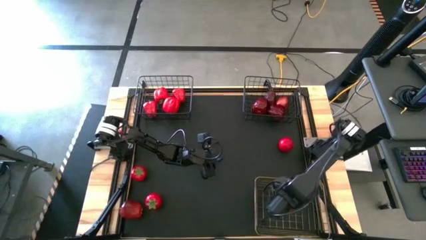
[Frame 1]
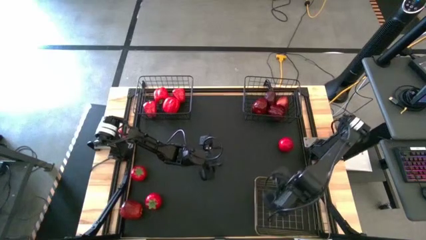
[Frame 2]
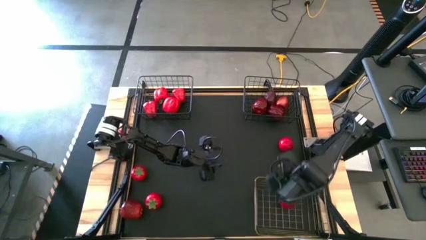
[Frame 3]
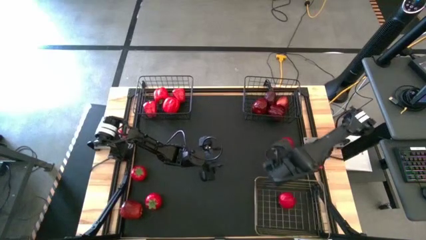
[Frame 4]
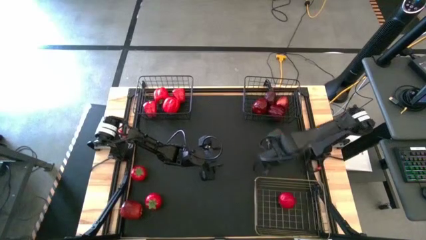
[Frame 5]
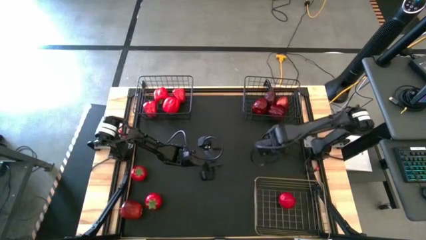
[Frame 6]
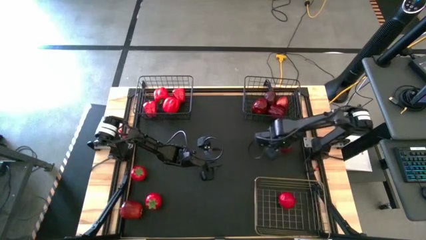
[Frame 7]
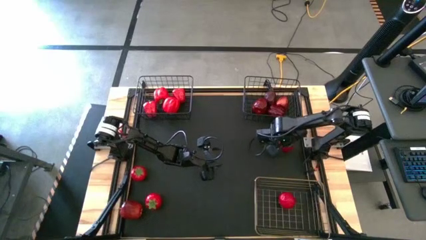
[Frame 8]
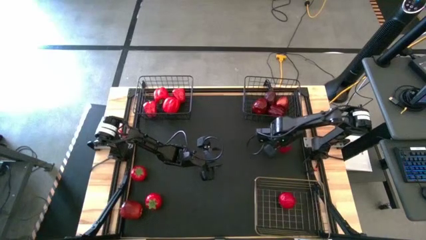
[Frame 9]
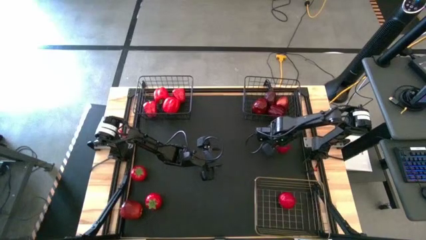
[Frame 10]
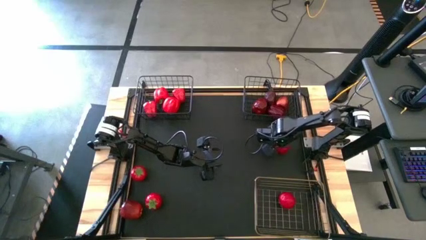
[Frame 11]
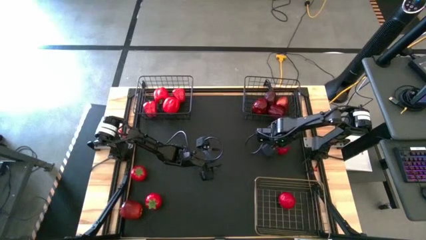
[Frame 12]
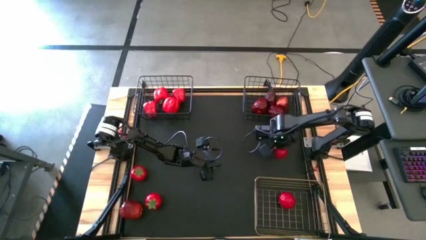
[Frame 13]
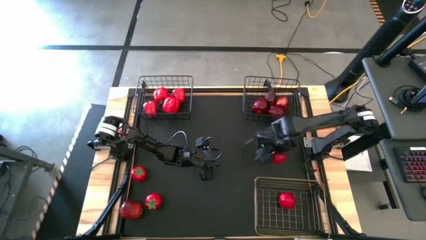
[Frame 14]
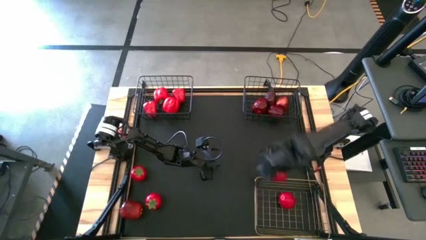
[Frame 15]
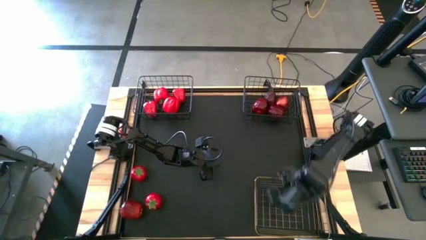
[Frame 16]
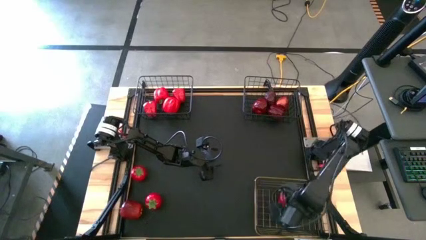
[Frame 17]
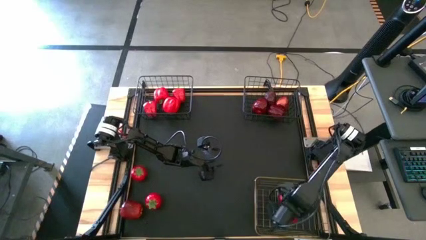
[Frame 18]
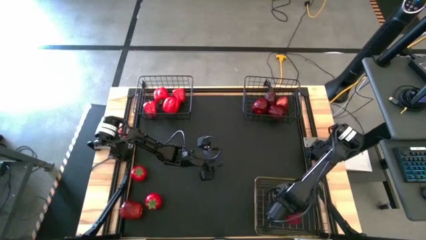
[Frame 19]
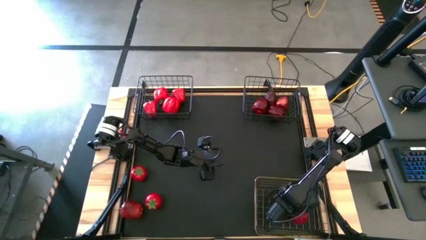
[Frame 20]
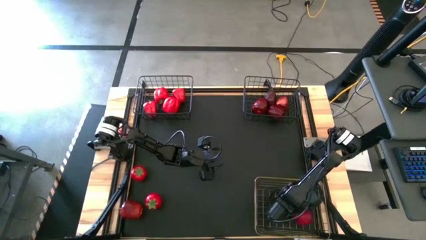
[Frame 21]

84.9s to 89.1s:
Task: Sort produce into baskets
Put the tomato into the gold wire basket

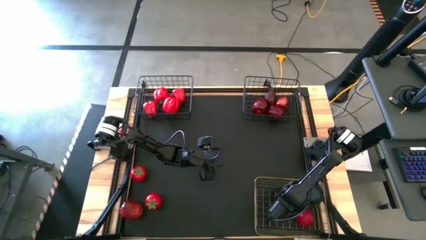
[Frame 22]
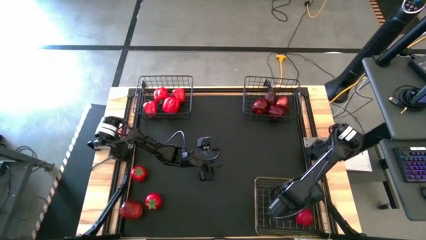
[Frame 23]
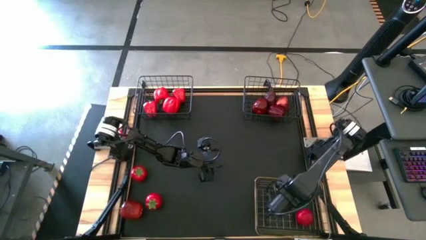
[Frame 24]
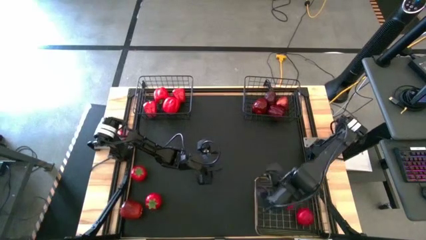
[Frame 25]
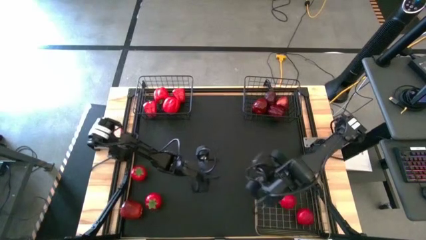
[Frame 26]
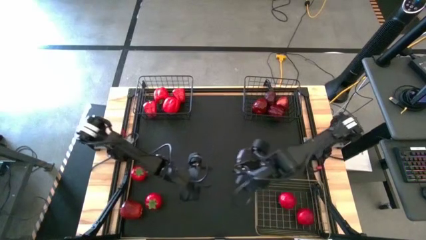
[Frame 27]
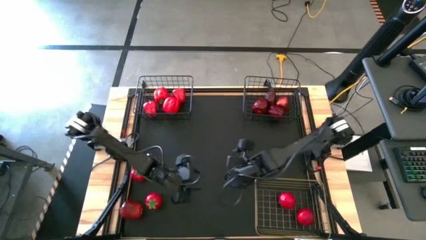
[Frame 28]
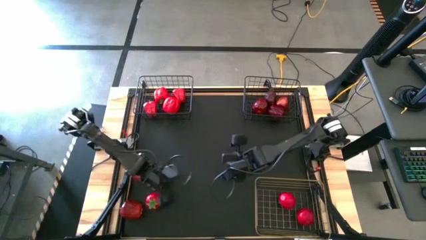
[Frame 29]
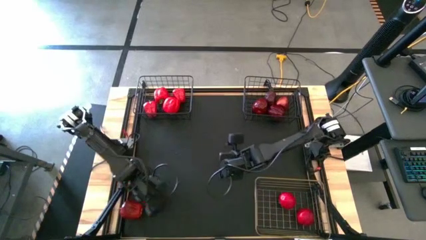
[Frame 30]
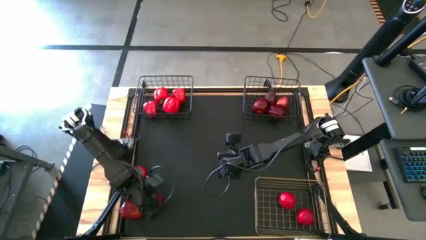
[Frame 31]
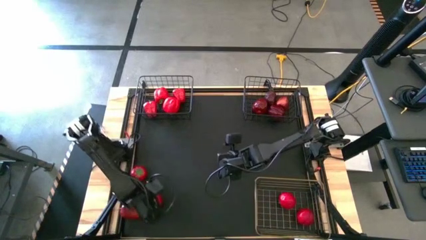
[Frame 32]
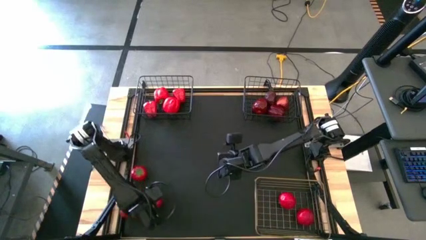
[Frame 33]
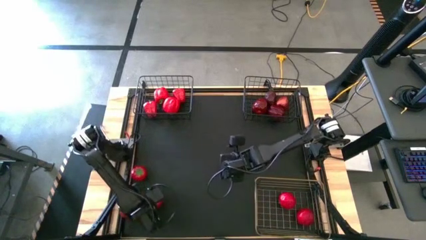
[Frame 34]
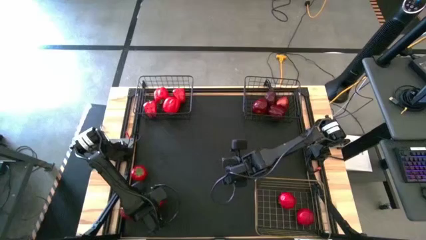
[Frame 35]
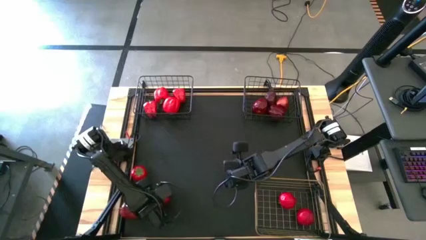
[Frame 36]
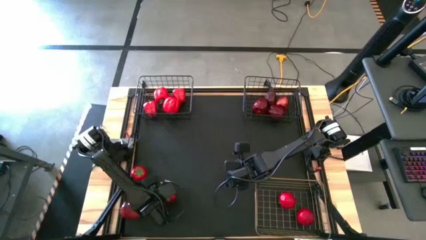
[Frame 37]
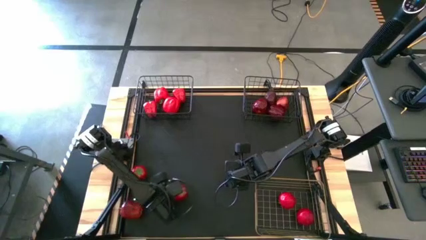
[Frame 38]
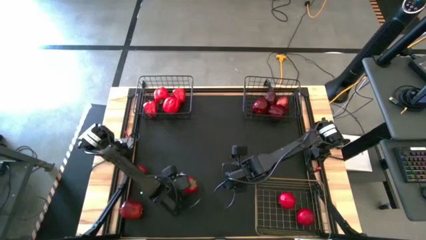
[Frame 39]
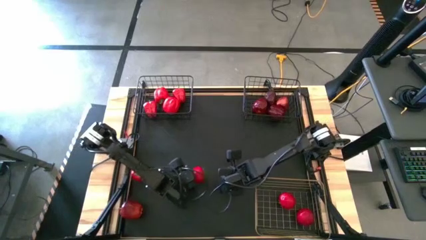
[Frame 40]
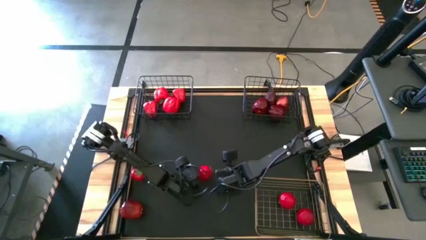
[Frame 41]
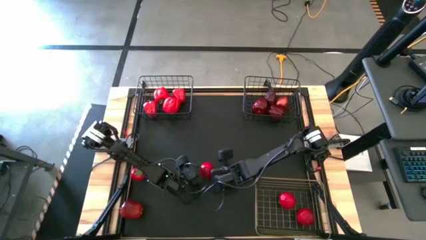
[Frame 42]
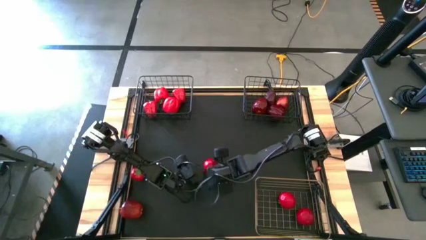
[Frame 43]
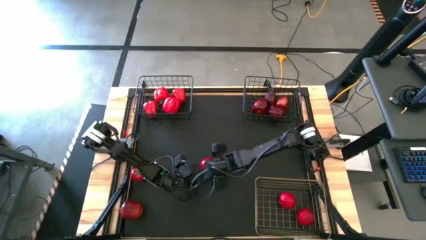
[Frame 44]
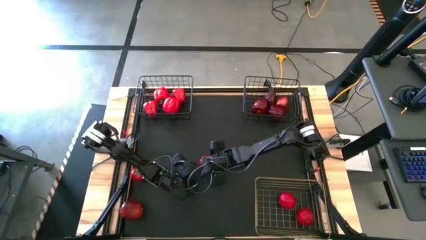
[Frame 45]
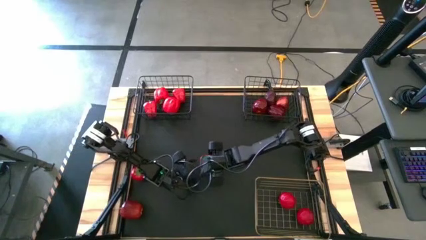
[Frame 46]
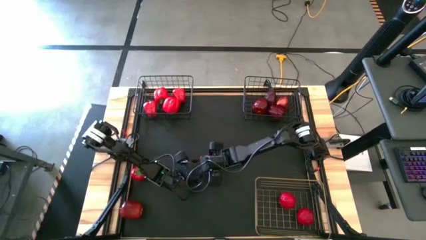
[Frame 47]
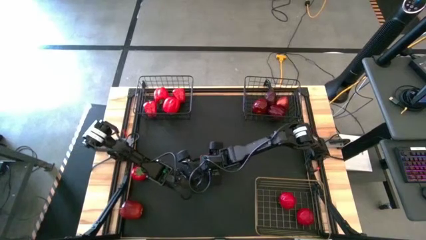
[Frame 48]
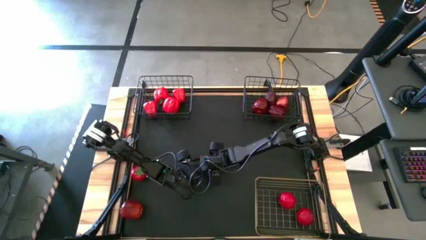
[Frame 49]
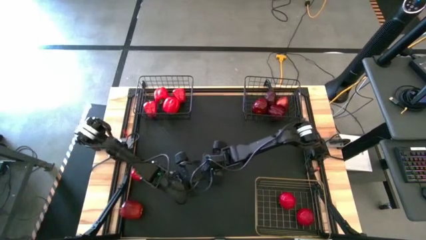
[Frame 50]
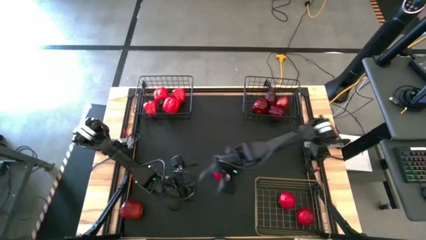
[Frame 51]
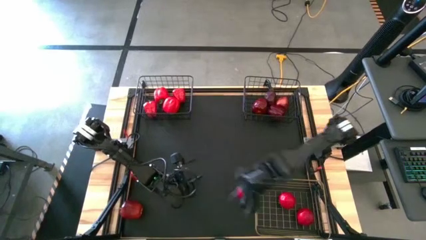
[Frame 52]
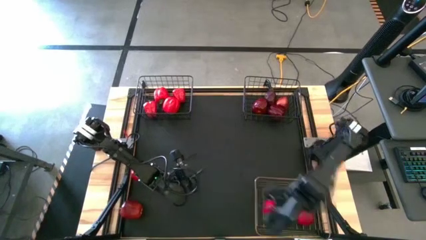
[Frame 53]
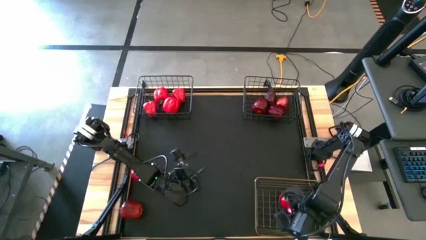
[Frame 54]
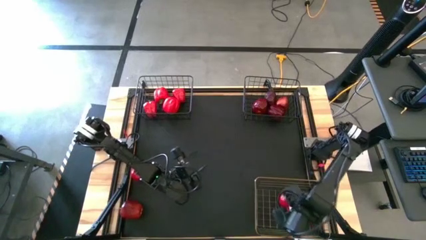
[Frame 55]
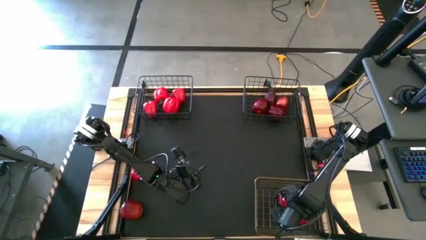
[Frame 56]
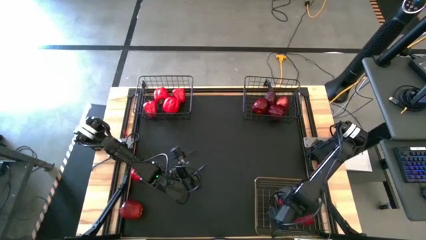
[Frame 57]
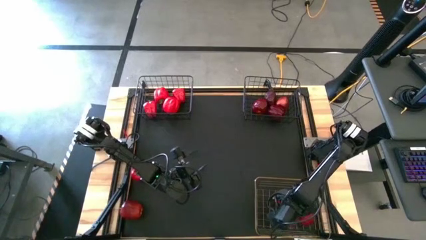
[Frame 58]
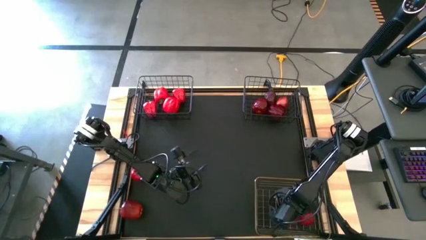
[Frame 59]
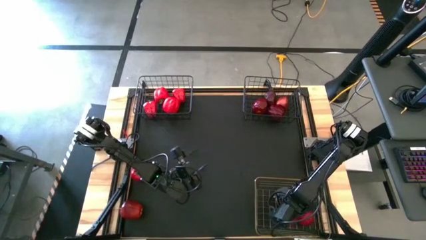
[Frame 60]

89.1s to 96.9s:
Put the tomato into the gold wire basket

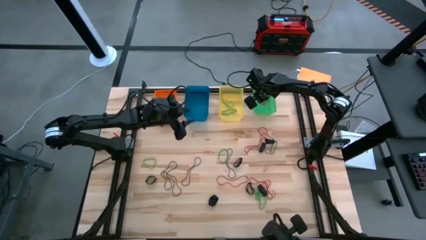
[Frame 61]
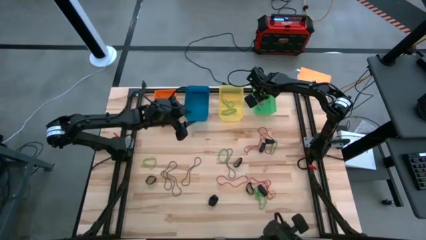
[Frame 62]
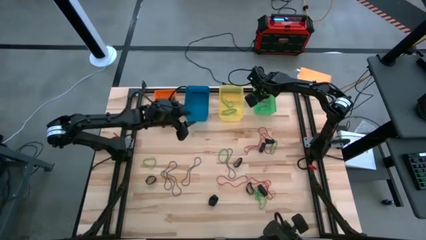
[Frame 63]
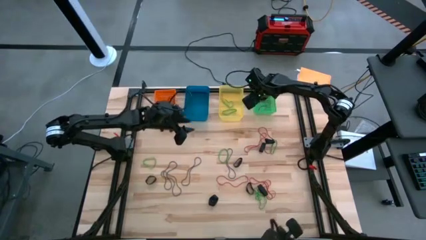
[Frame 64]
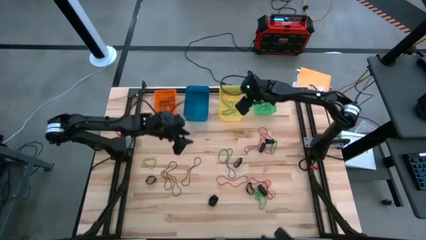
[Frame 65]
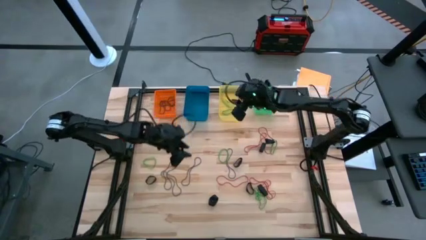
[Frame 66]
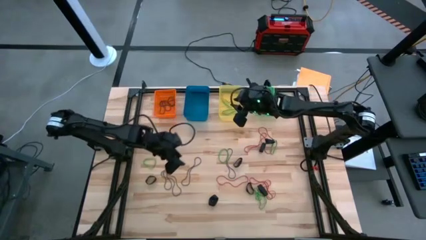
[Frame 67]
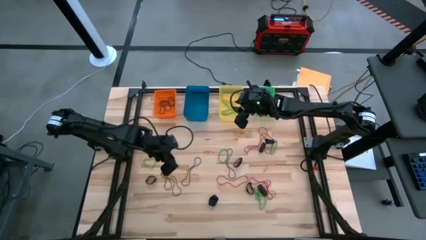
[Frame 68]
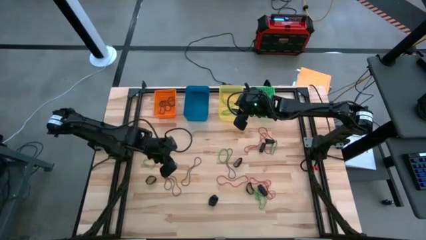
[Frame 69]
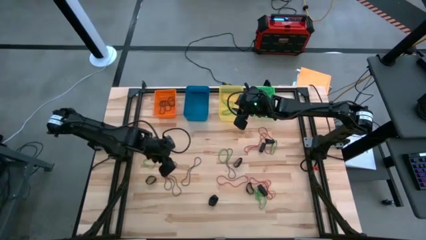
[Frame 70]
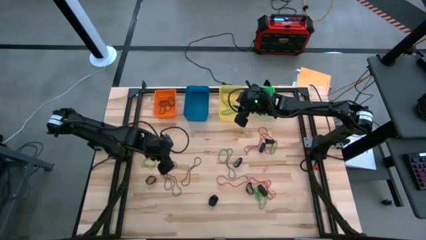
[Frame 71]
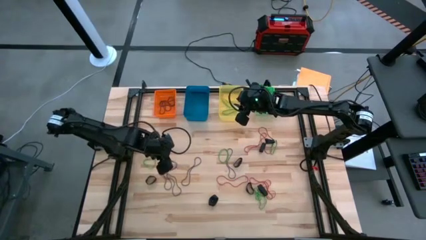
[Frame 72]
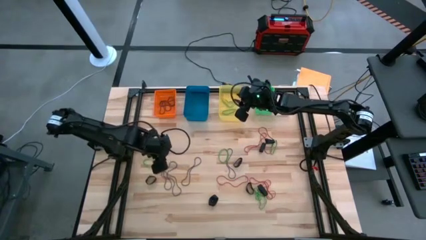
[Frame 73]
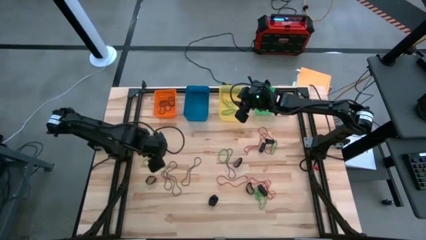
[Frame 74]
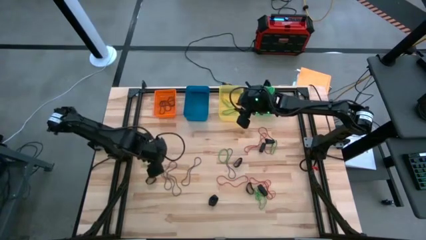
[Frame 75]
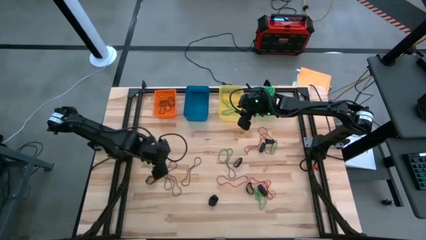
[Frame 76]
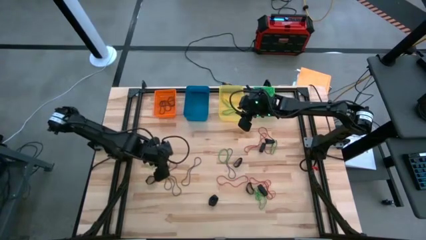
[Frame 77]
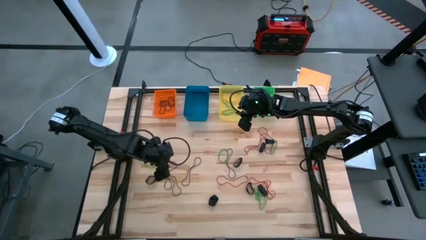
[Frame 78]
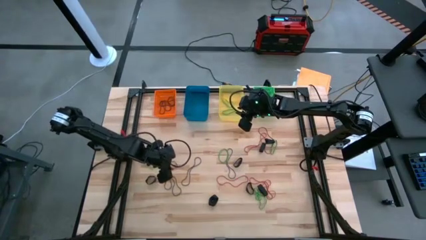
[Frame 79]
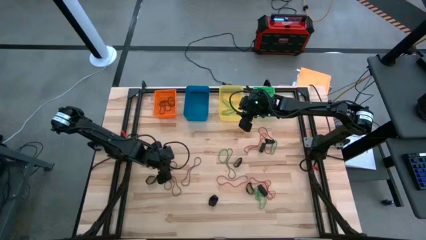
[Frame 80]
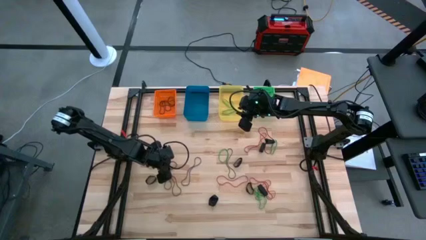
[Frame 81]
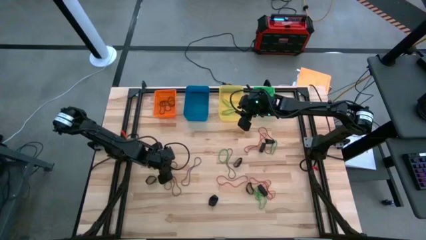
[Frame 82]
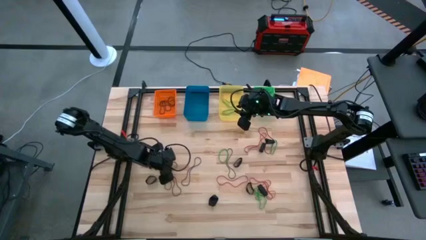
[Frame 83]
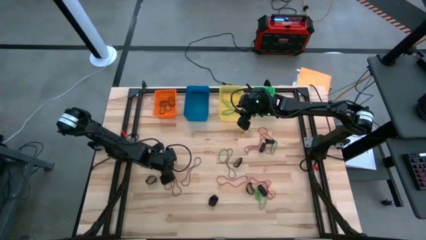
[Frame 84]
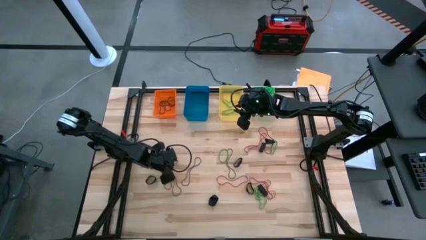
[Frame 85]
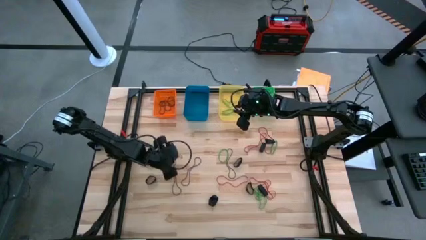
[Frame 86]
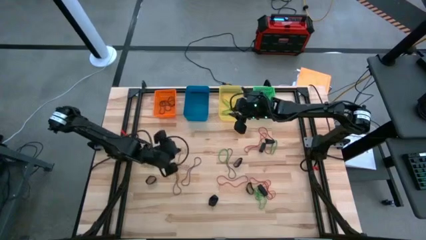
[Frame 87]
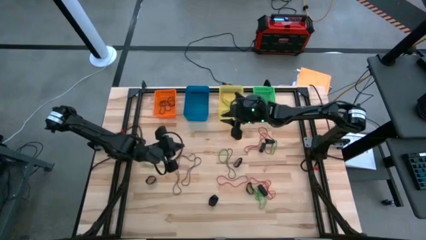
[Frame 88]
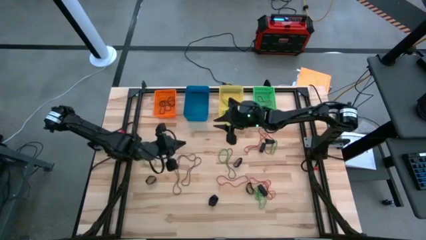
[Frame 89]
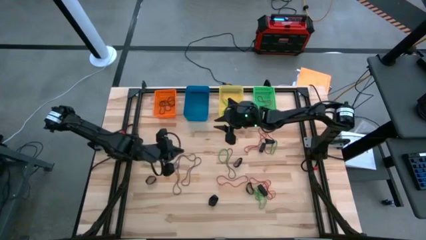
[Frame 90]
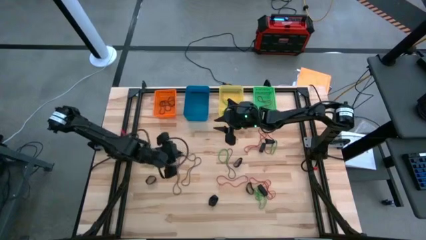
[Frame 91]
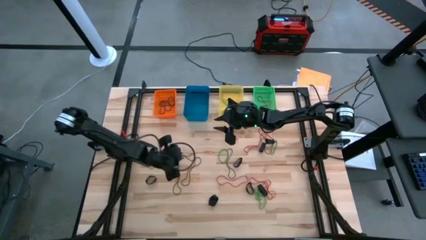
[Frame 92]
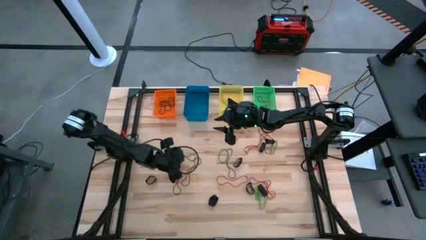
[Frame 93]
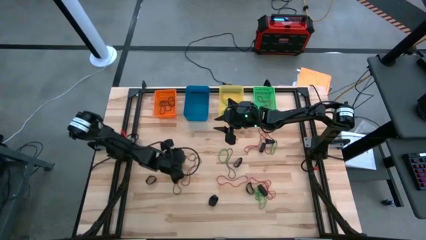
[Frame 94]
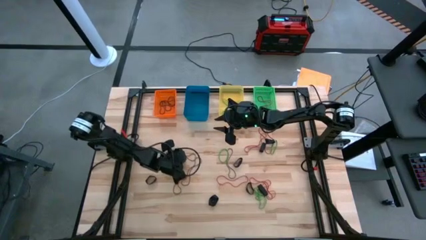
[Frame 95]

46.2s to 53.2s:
Task: Sort rubber bands into baskets
Put the violet rubber band into the orange bin
